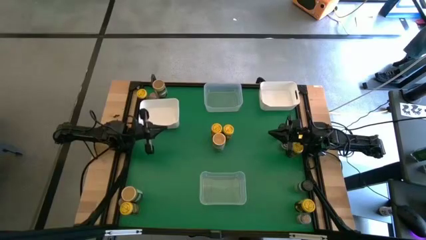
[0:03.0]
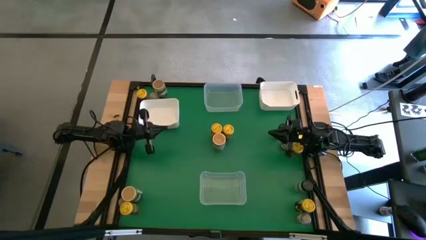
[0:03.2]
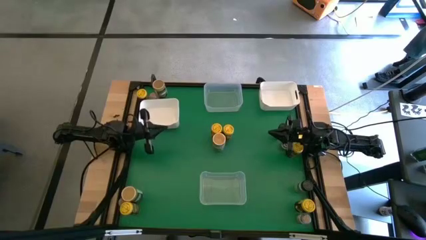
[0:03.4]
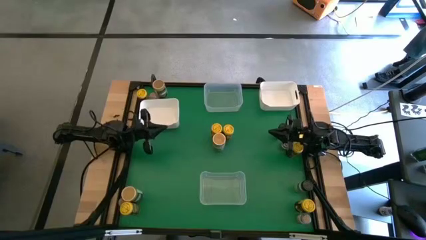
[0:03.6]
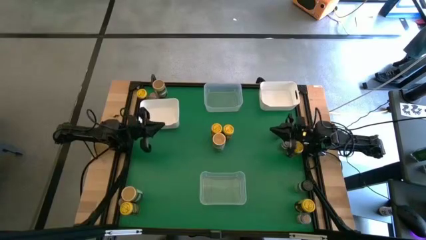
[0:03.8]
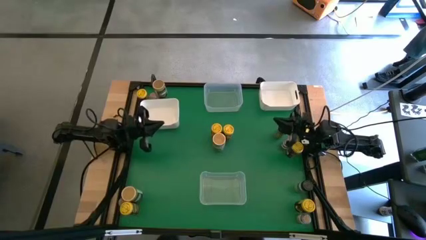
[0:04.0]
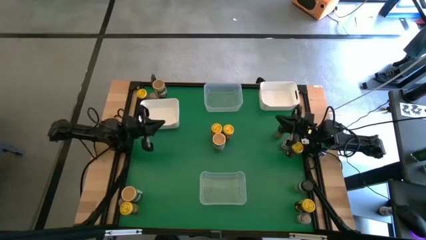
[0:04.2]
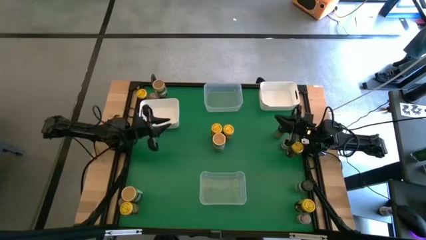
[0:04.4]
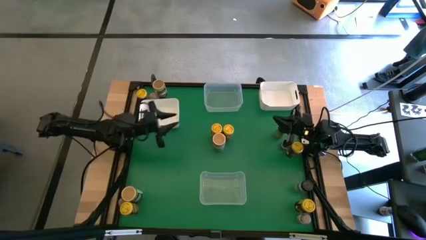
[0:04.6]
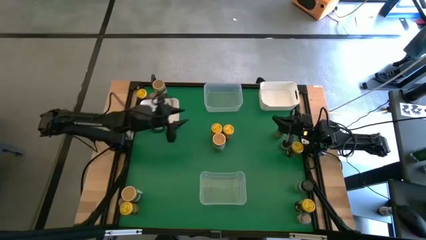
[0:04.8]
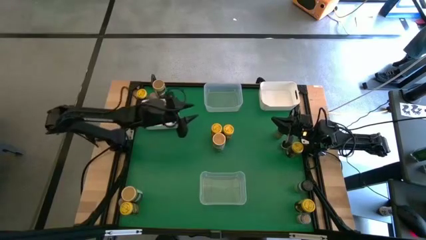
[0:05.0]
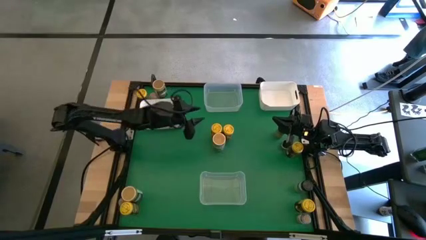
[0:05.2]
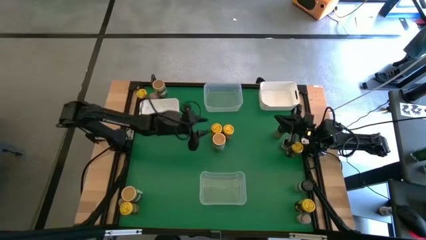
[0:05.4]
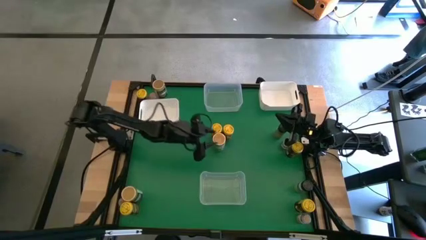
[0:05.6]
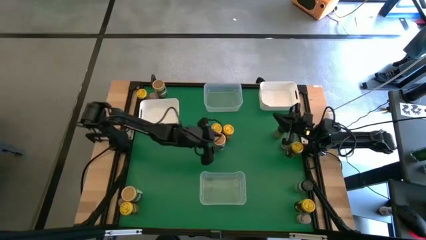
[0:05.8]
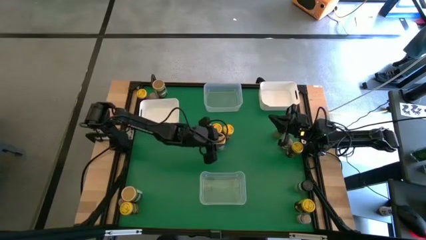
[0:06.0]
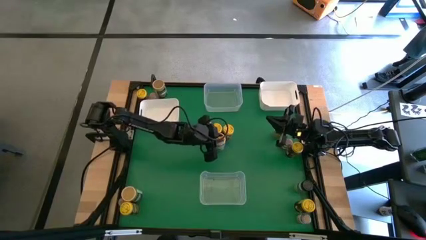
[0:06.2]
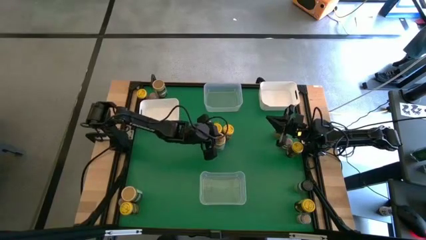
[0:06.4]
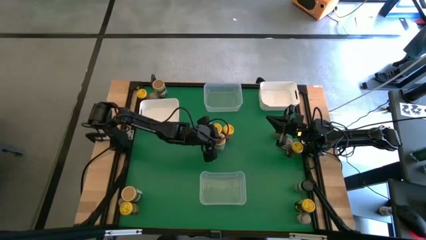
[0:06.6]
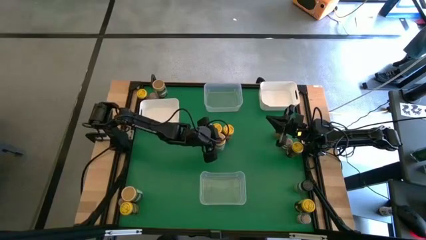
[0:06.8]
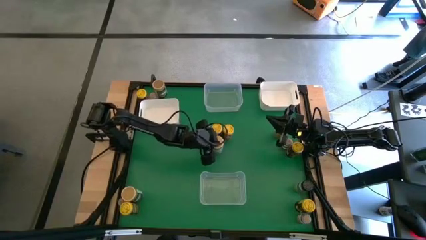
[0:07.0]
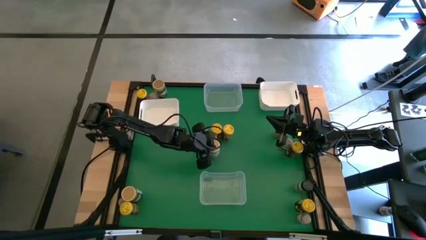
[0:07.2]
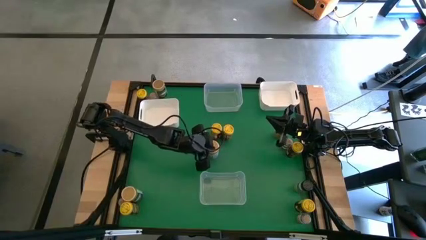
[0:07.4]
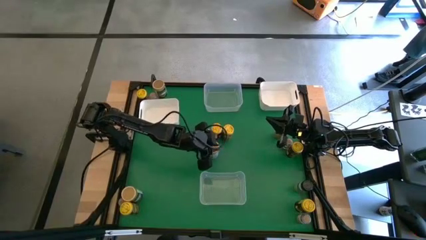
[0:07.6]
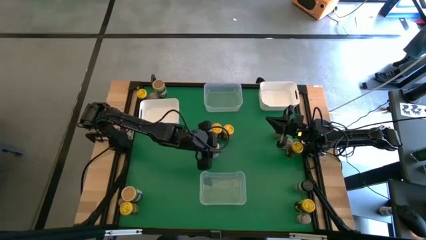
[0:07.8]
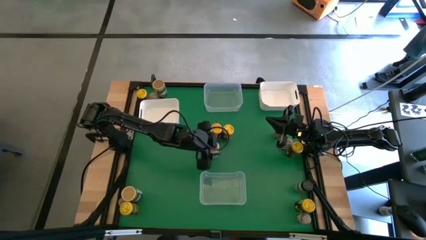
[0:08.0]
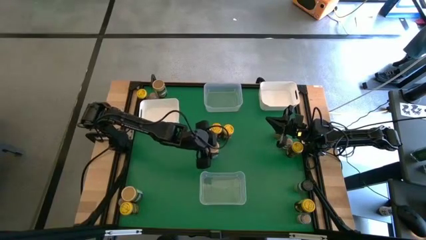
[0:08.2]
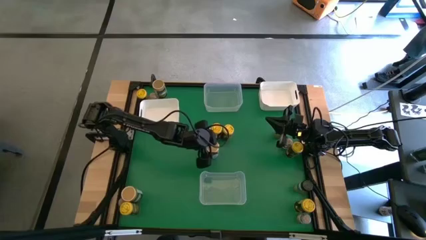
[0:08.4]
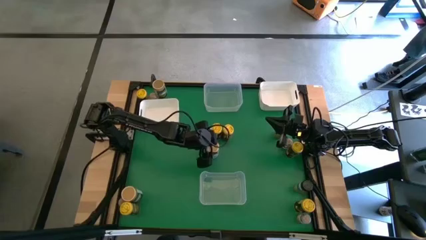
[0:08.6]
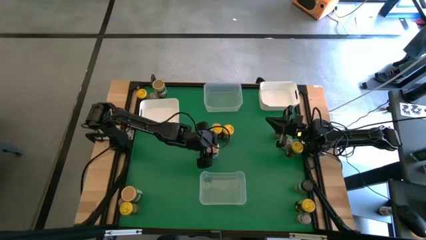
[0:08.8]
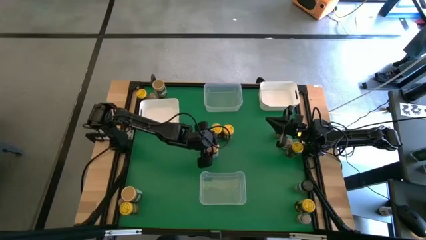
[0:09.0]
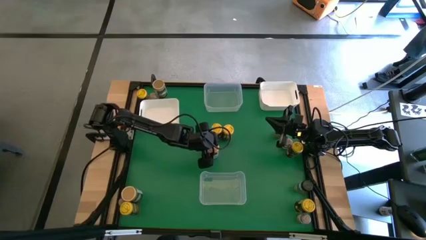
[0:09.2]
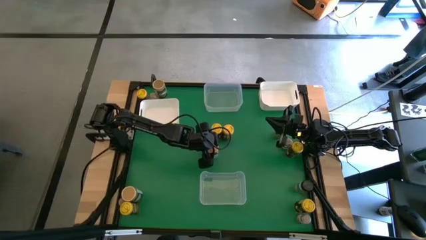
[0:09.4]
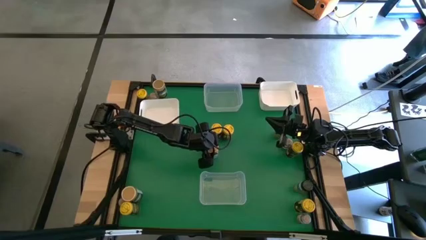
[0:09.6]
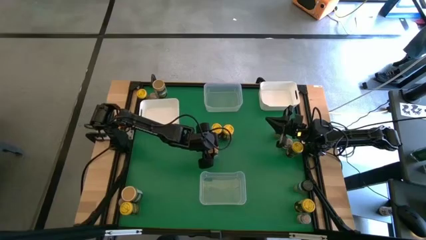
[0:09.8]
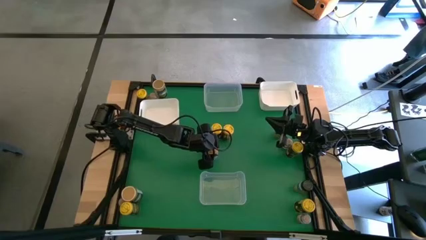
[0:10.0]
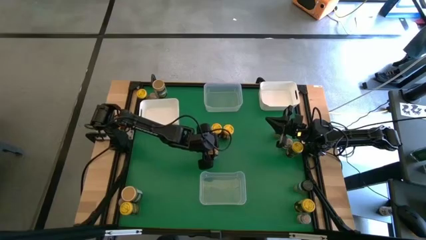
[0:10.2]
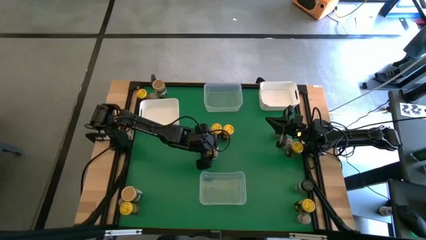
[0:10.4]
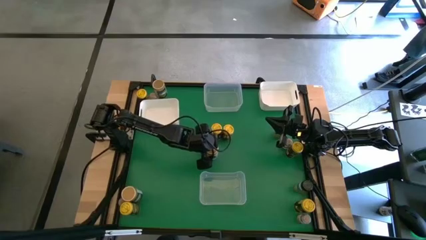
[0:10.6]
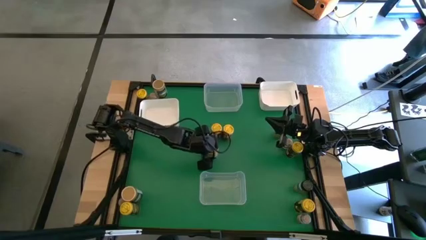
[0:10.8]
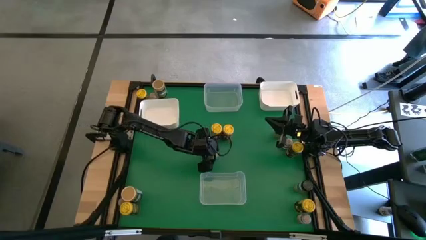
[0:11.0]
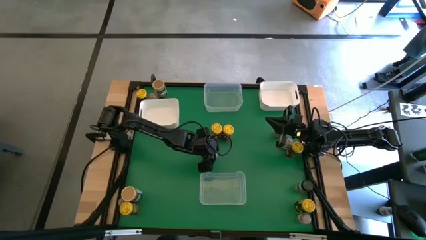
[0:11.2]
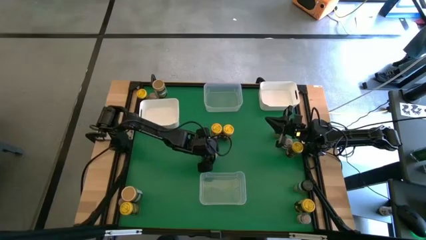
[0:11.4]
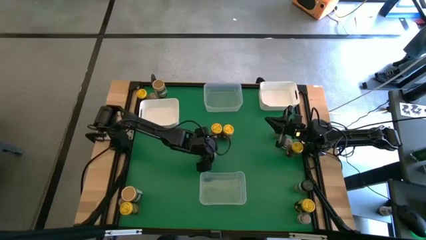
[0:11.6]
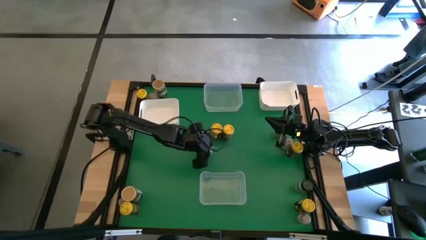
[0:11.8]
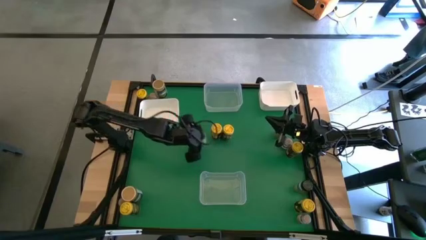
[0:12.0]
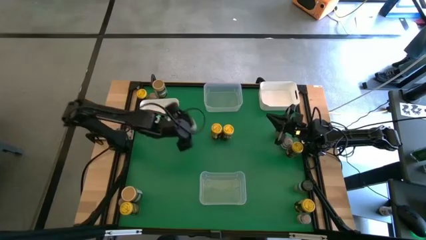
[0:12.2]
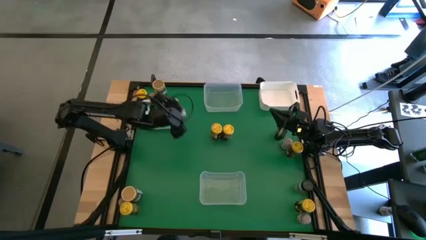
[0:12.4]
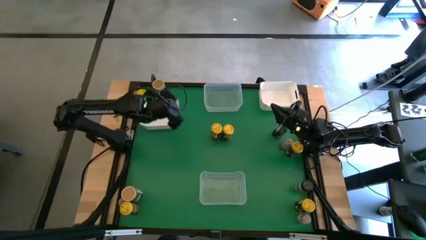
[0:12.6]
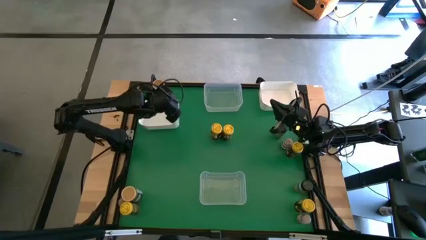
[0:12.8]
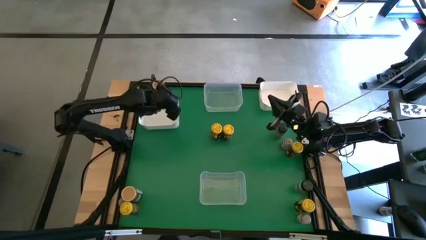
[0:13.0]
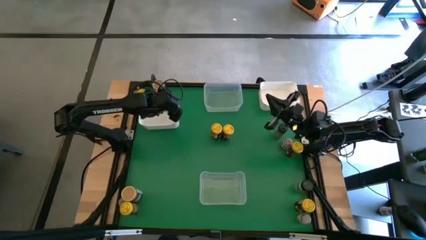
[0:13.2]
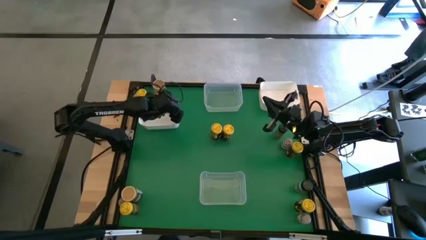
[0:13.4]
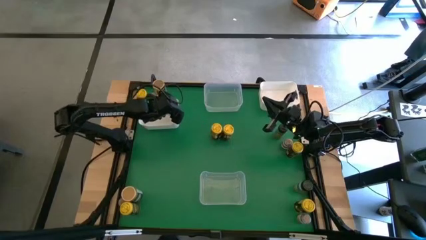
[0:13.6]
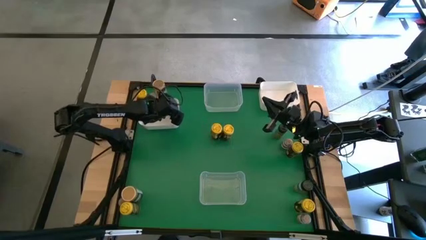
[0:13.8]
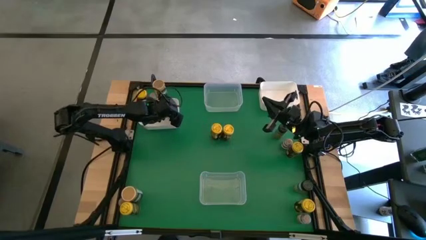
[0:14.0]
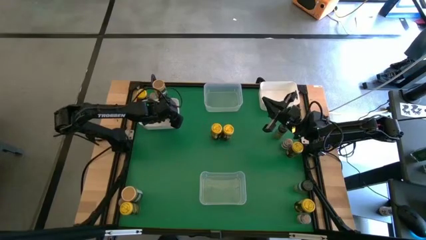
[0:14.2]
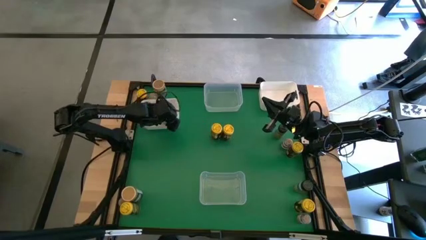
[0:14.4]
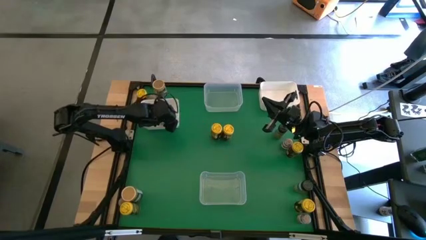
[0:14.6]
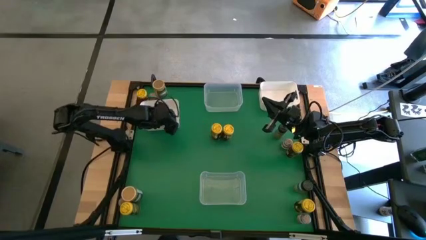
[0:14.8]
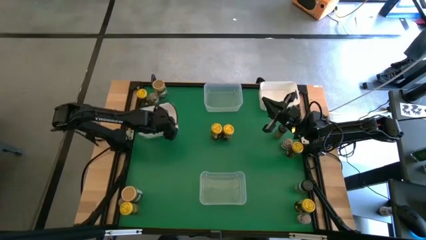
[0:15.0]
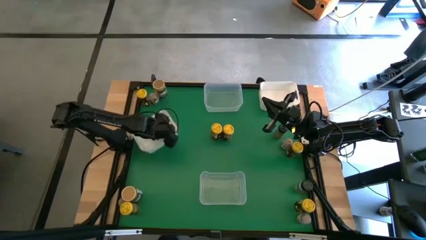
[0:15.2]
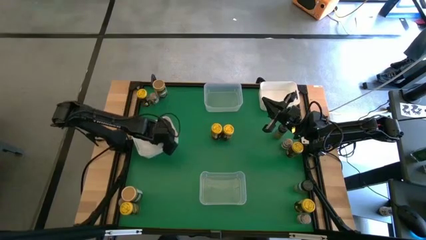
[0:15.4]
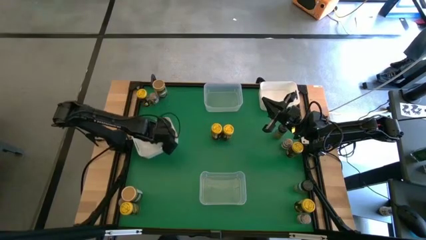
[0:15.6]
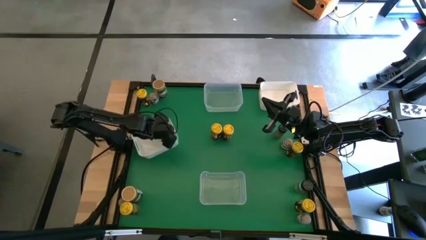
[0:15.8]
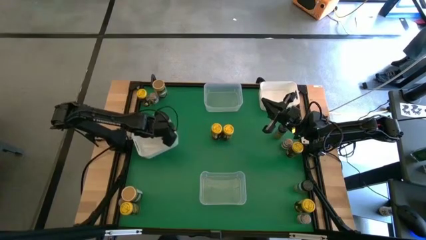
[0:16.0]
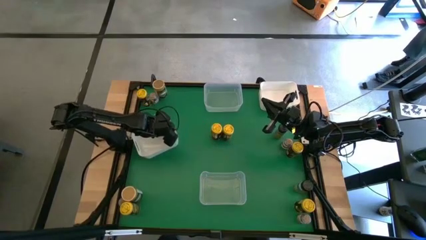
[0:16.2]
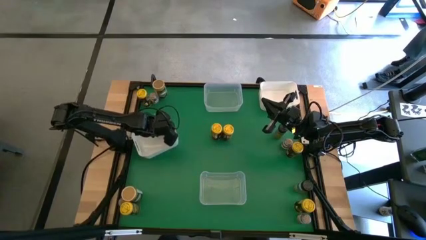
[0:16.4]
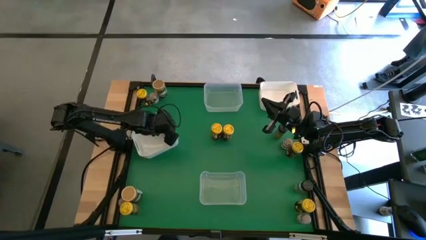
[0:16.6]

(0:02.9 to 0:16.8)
Task: Sort spices by type
Put the gold spice bottle into the left white bin
